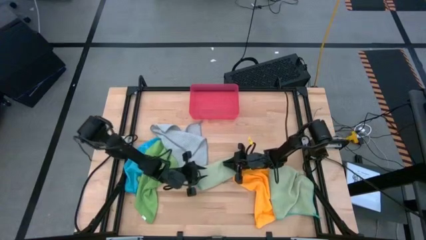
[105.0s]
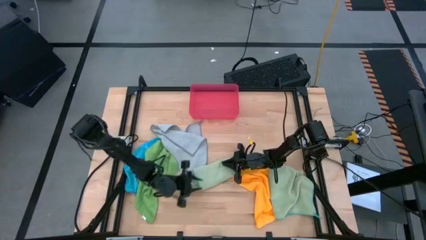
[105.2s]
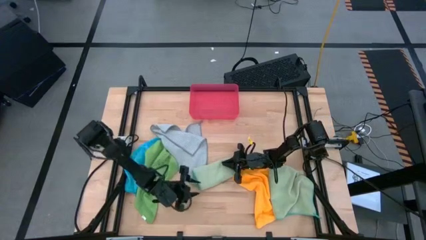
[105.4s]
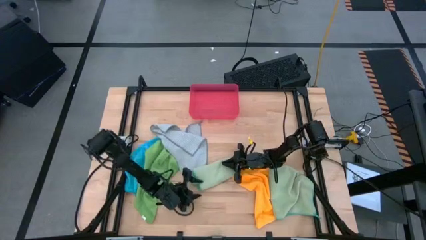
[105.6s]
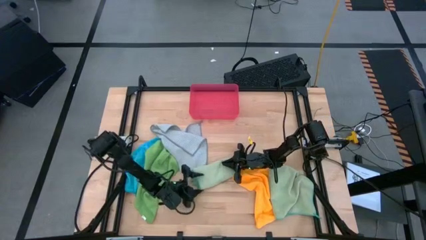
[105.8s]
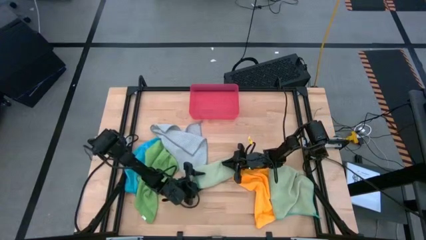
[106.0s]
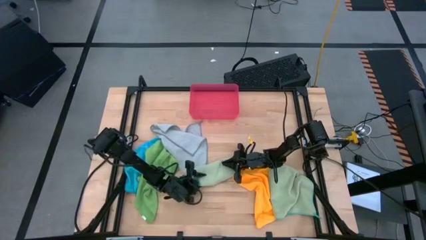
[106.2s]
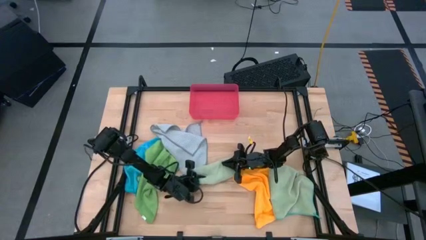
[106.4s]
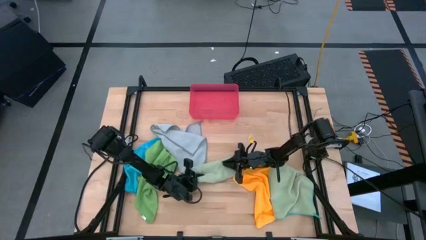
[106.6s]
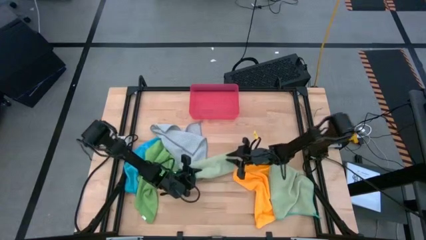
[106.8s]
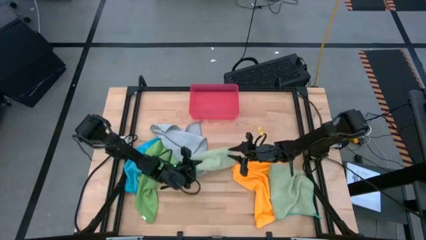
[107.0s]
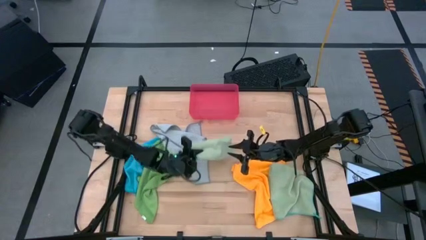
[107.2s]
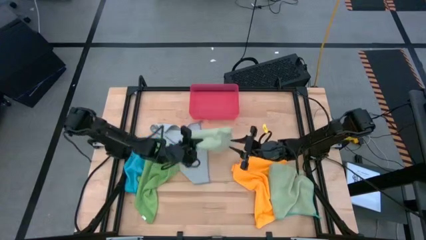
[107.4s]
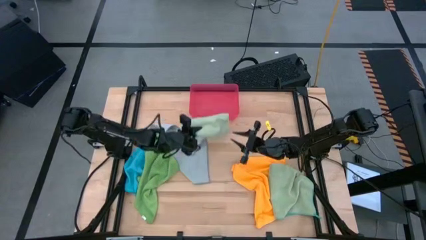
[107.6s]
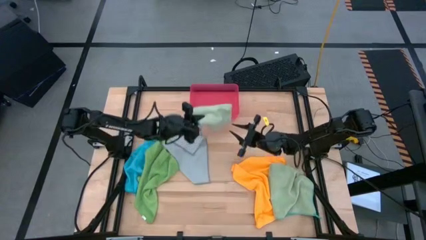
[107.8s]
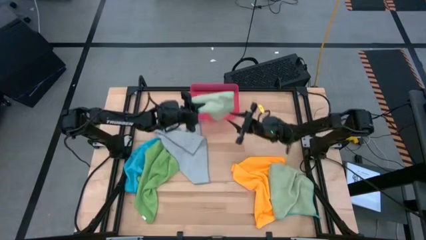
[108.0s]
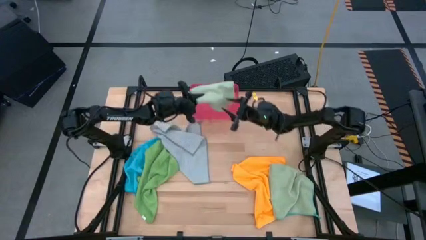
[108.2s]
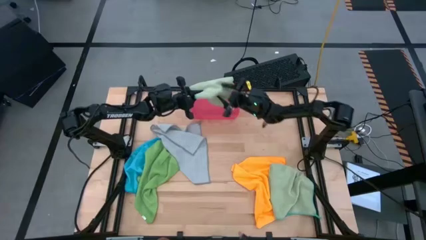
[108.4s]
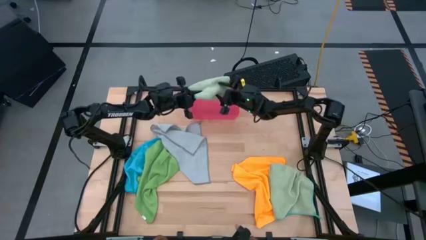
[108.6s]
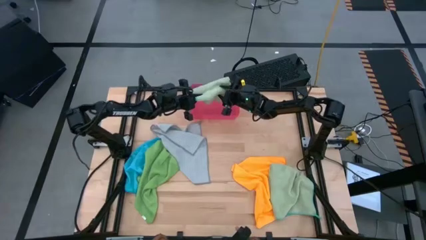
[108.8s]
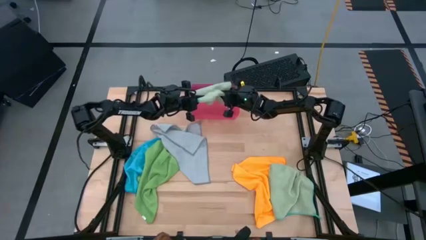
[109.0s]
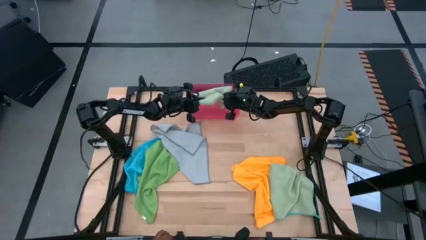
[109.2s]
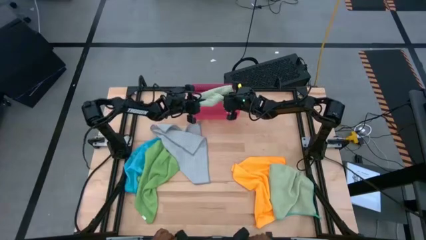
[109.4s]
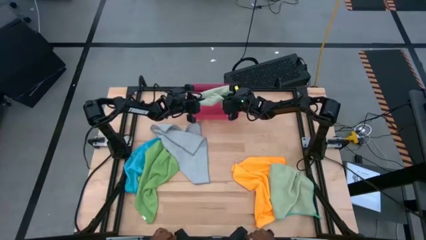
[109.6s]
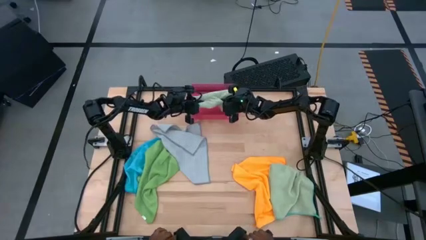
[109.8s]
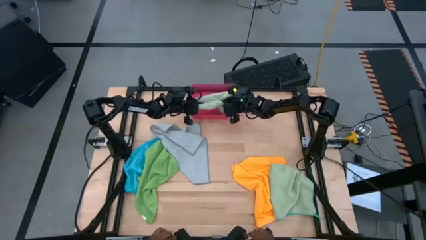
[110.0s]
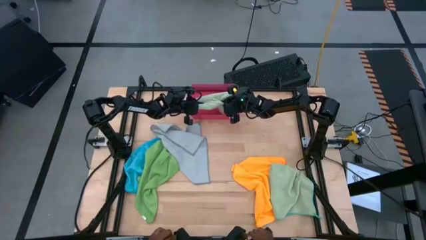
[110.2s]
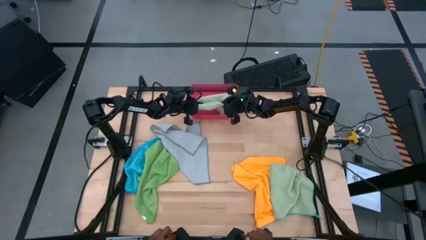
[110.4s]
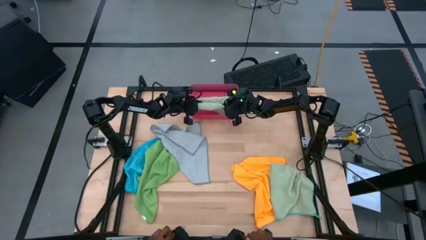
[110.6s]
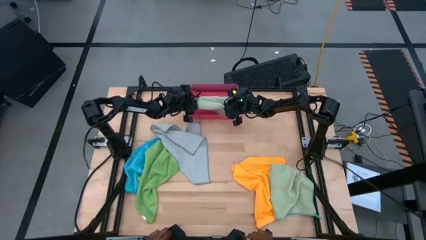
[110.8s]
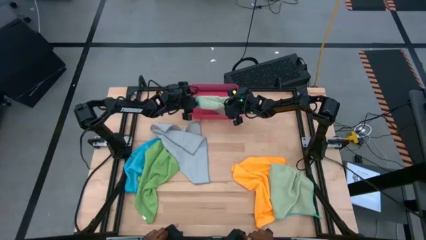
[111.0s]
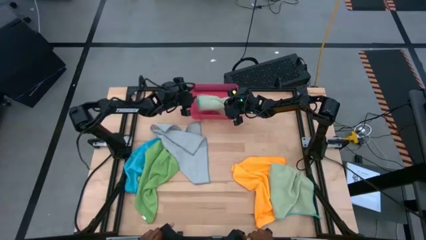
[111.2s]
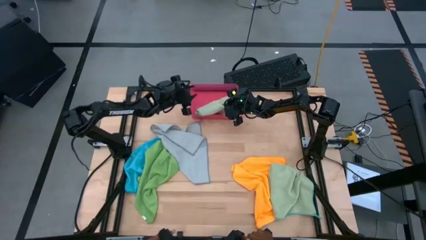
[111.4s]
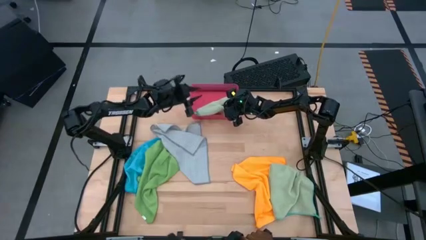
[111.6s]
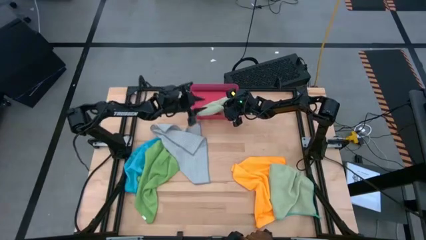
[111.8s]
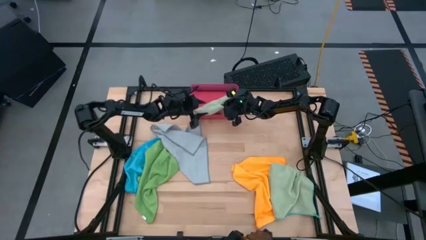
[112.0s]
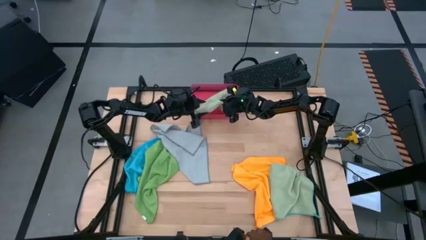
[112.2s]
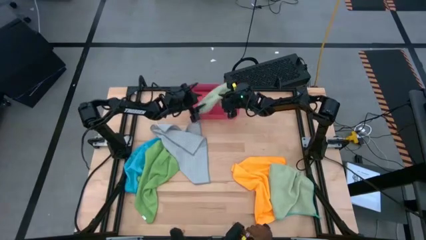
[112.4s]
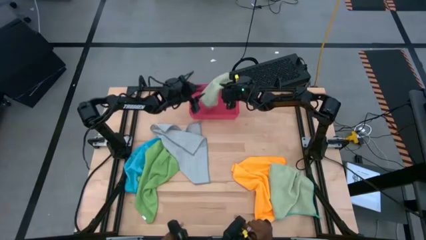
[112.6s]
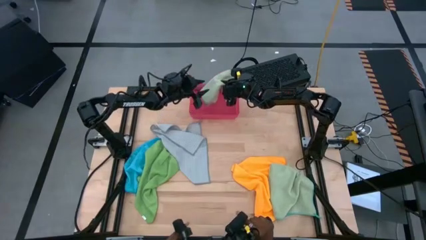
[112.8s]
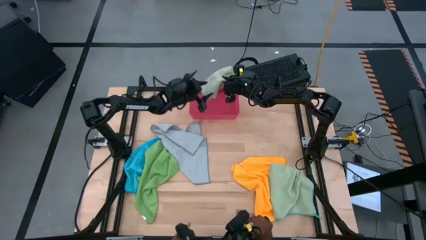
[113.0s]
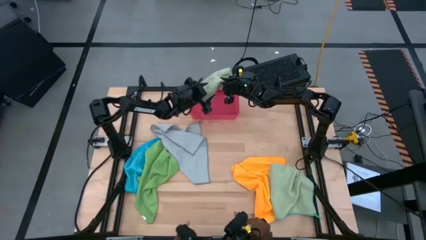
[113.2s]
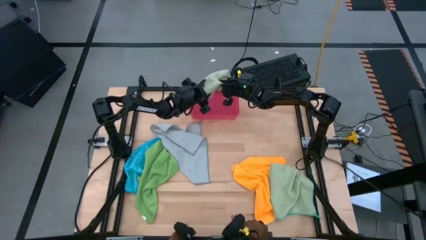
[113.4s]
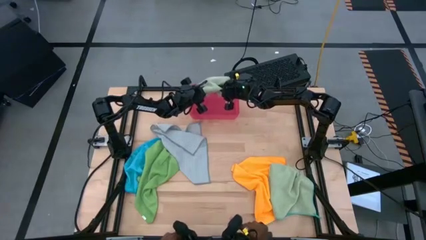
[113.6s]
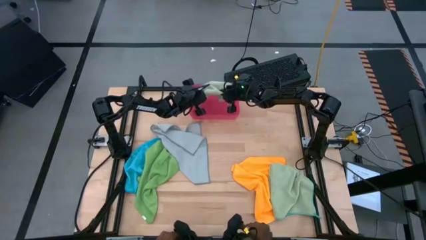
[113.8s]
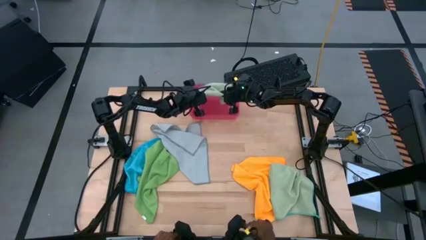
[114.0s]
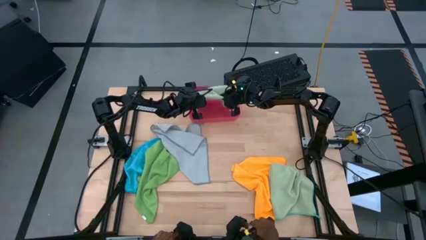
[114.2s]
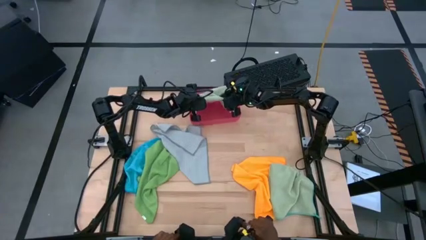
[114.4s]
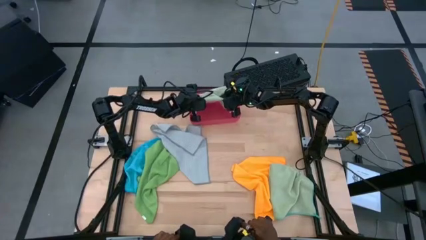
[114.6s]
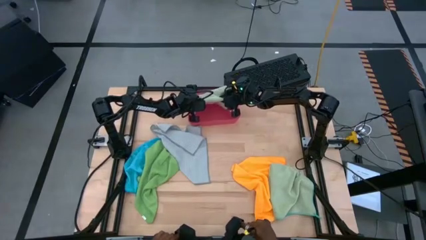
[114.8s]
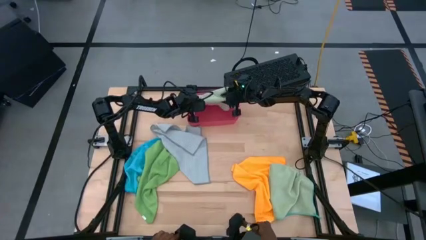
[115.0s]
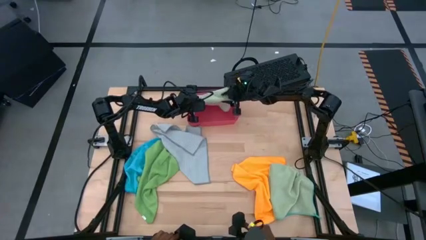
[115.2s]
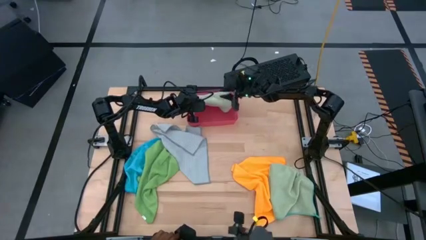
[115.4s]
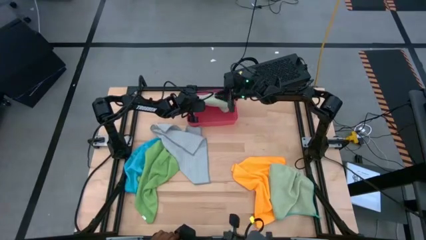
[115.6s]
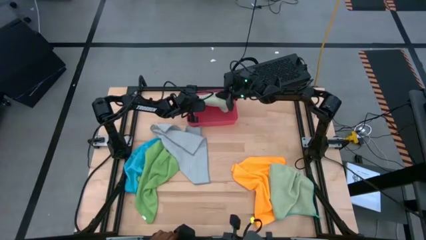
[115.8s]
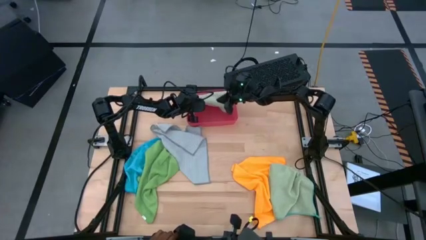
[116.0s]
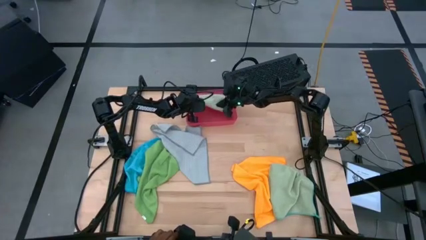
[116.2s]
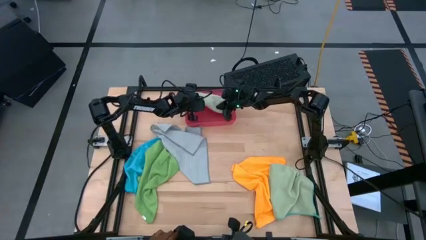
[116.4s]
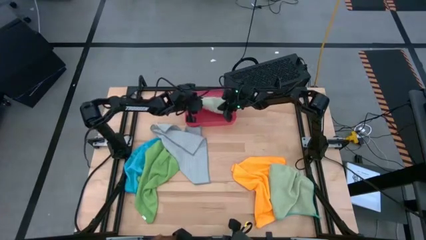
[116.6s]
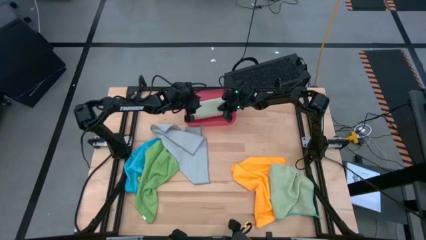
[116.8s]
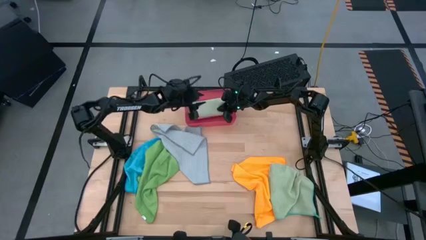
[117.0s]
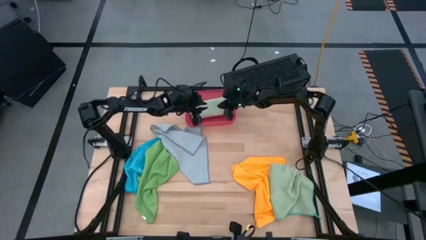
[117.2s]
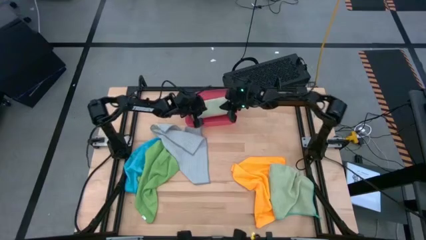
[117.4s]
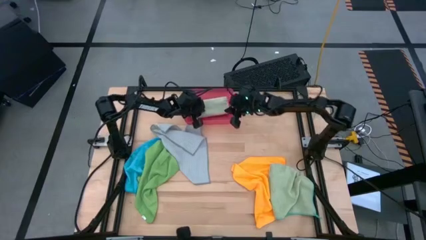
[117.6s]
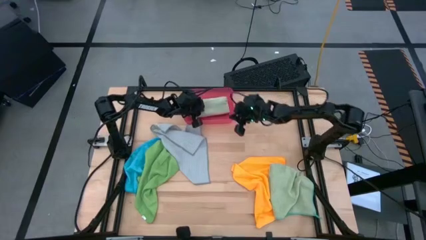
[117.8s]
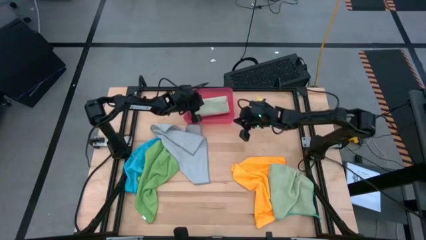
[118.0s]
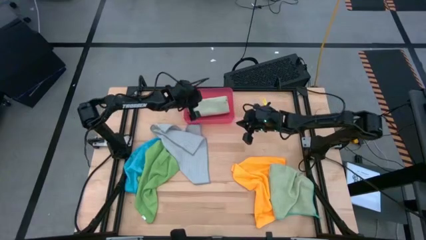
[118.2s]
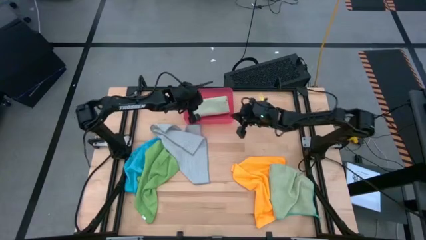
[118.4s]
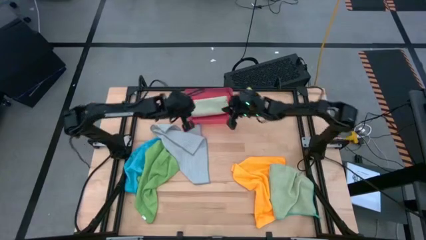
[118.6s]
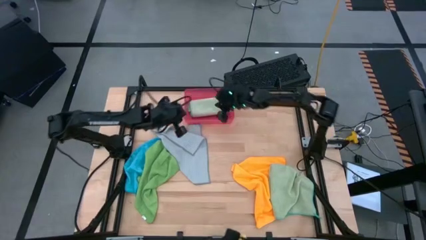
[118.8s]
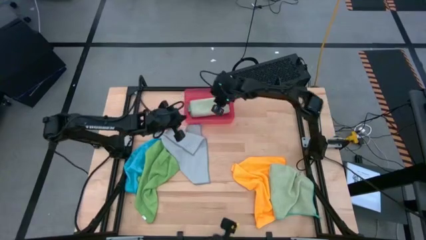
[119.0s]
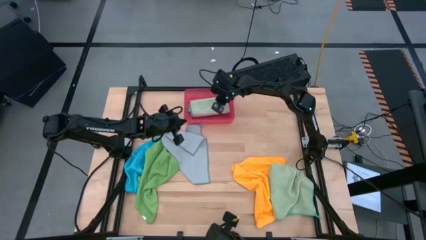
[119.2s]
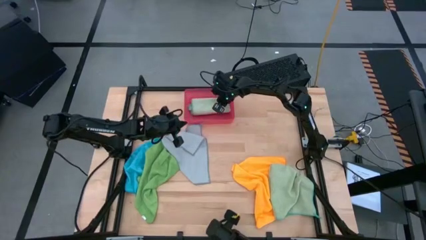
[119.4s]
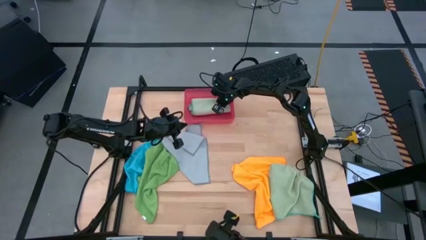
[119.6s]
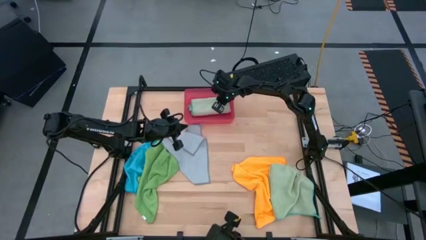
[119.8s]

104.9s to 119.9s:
Task: Fold microfiber towels
Put the folded light green towel into the red bin
